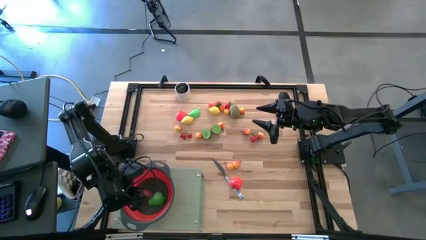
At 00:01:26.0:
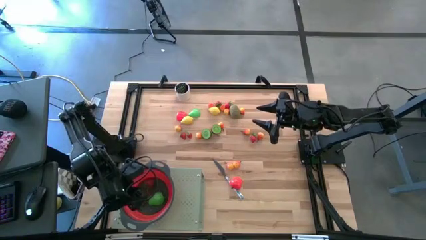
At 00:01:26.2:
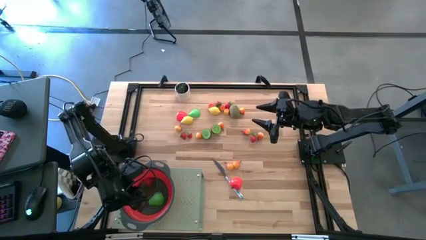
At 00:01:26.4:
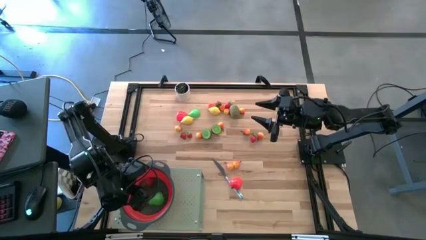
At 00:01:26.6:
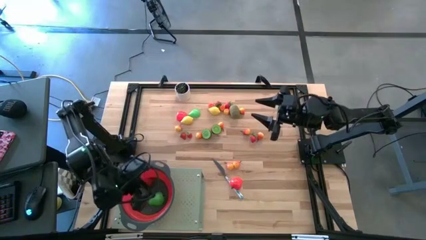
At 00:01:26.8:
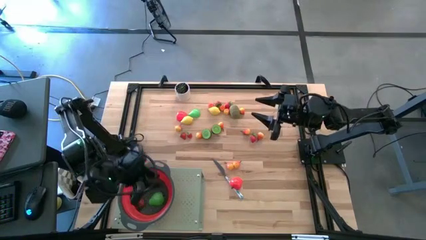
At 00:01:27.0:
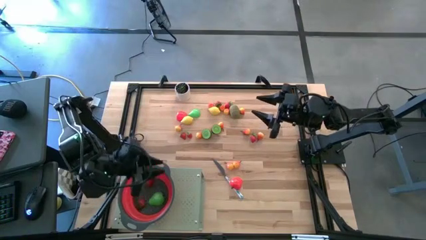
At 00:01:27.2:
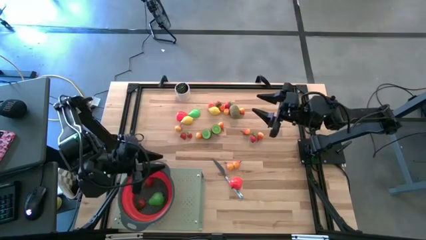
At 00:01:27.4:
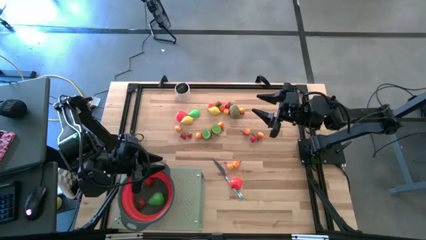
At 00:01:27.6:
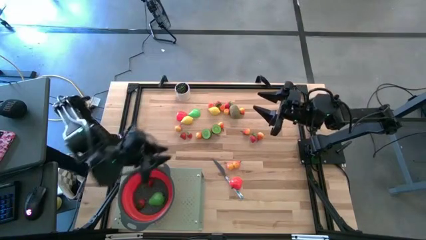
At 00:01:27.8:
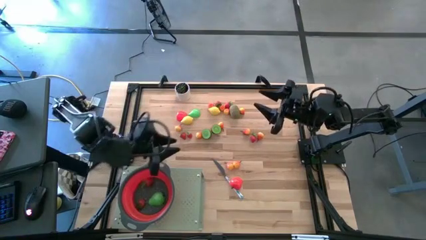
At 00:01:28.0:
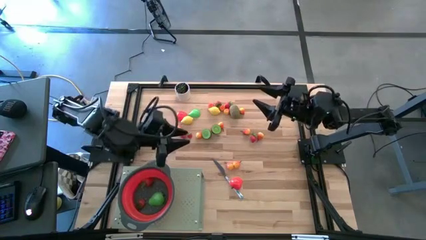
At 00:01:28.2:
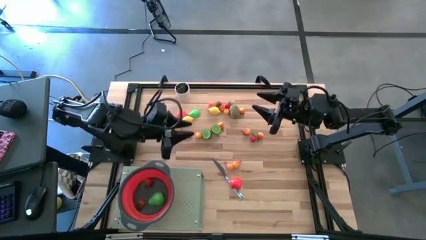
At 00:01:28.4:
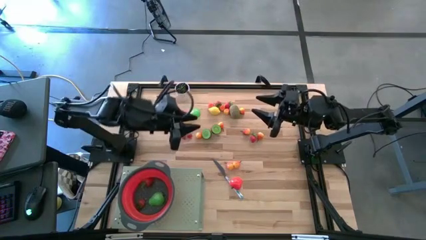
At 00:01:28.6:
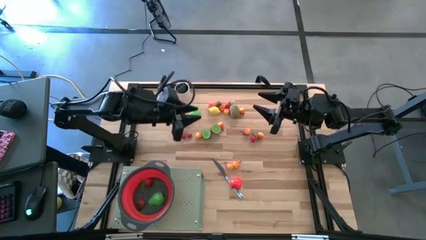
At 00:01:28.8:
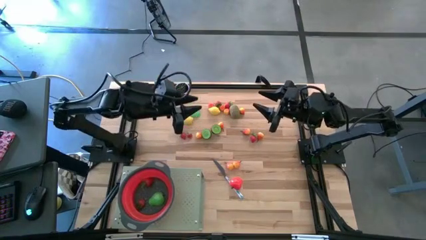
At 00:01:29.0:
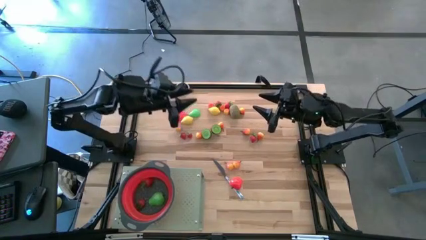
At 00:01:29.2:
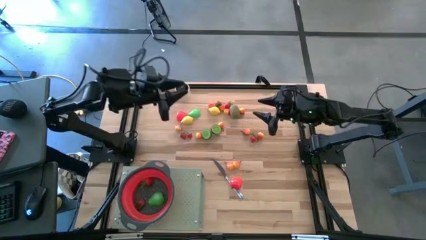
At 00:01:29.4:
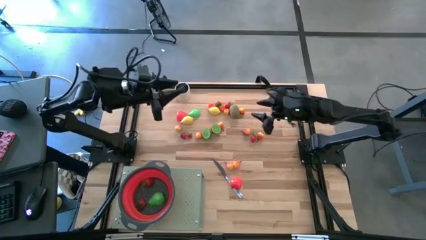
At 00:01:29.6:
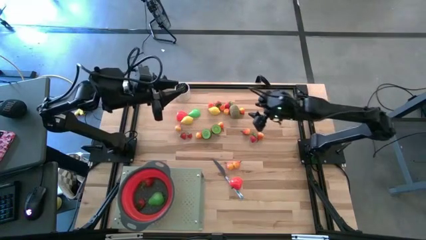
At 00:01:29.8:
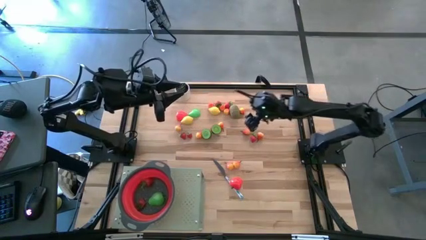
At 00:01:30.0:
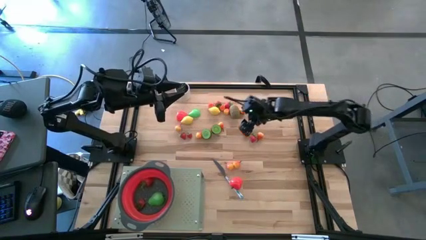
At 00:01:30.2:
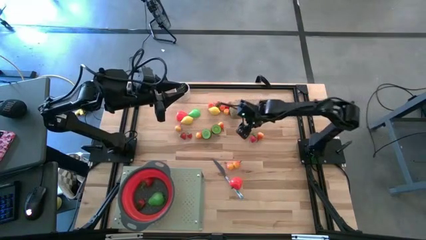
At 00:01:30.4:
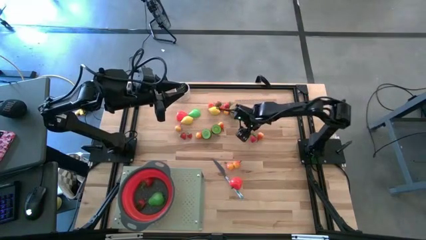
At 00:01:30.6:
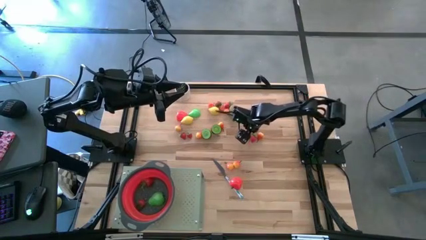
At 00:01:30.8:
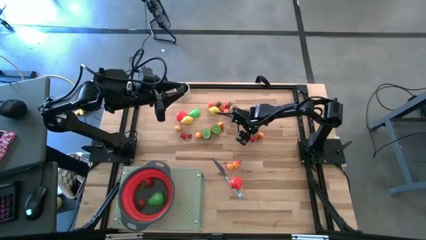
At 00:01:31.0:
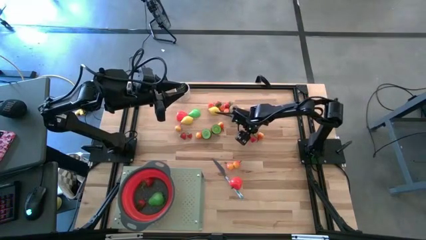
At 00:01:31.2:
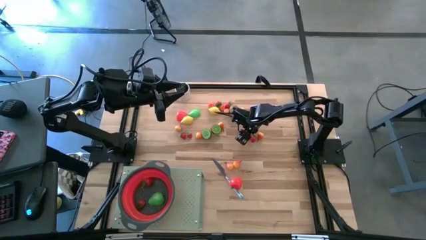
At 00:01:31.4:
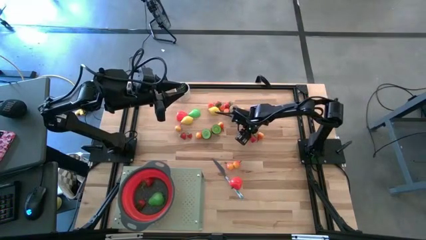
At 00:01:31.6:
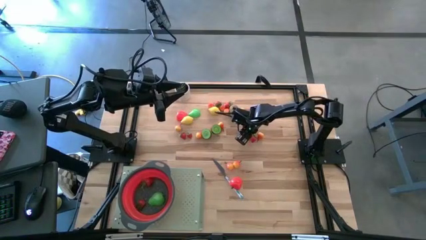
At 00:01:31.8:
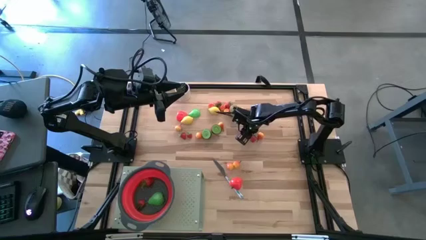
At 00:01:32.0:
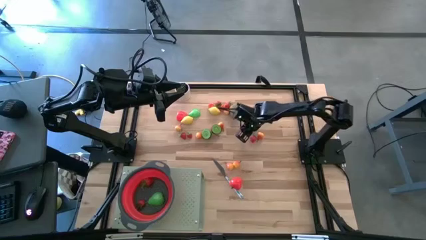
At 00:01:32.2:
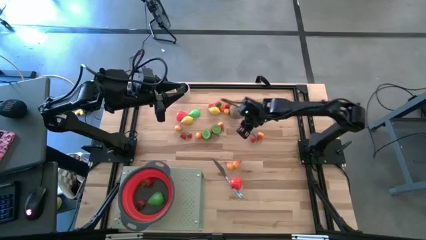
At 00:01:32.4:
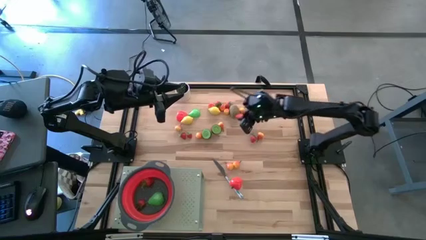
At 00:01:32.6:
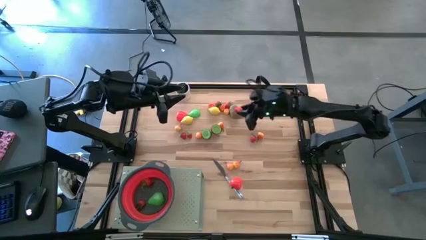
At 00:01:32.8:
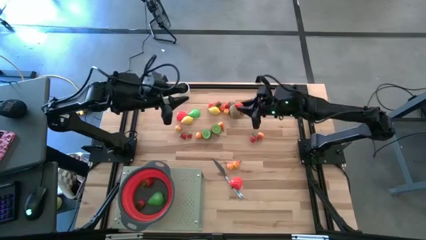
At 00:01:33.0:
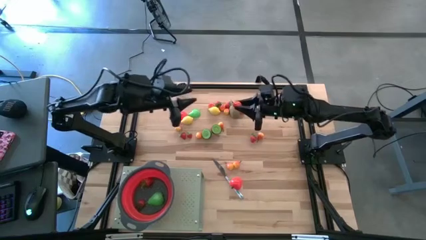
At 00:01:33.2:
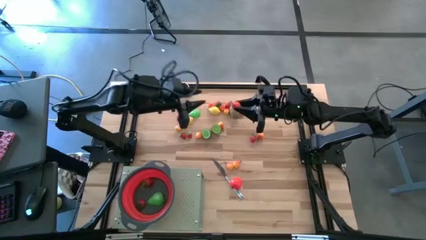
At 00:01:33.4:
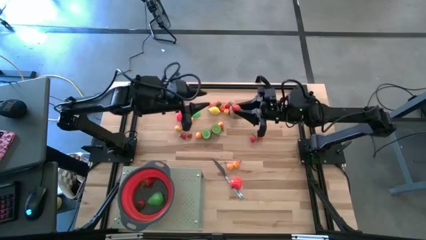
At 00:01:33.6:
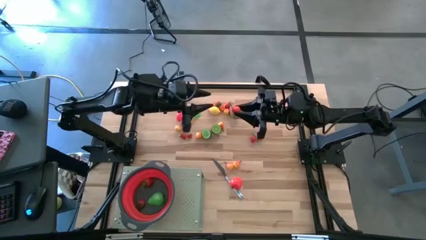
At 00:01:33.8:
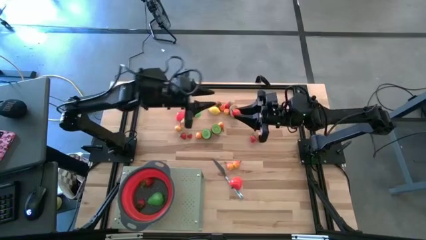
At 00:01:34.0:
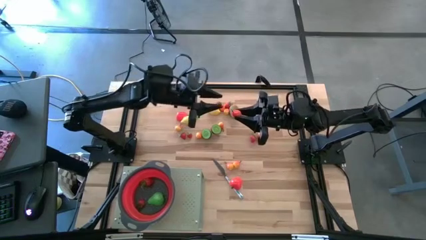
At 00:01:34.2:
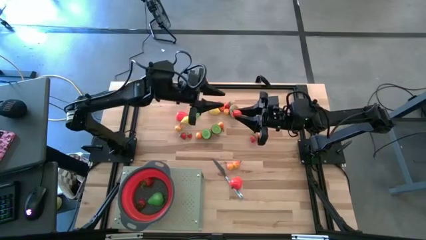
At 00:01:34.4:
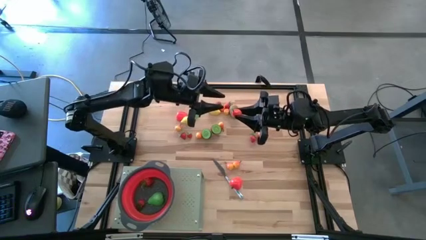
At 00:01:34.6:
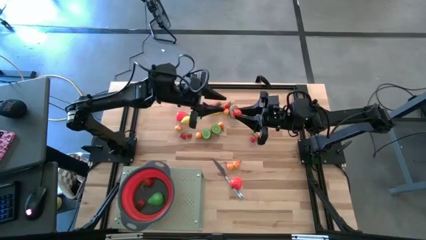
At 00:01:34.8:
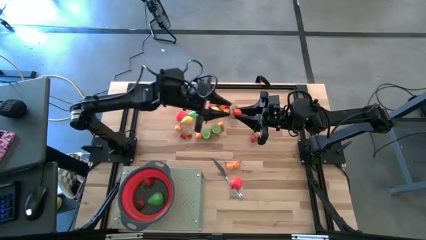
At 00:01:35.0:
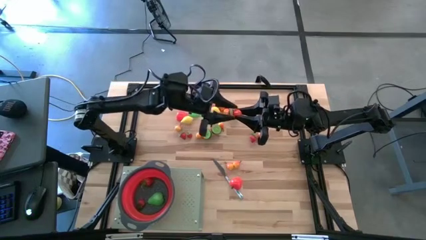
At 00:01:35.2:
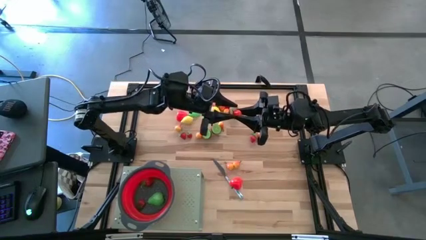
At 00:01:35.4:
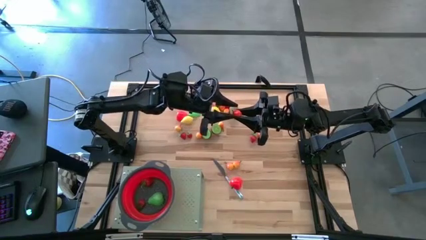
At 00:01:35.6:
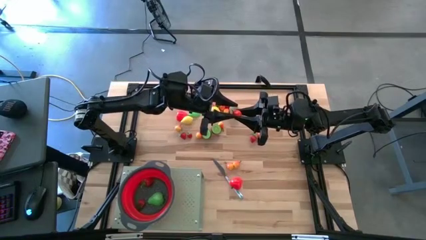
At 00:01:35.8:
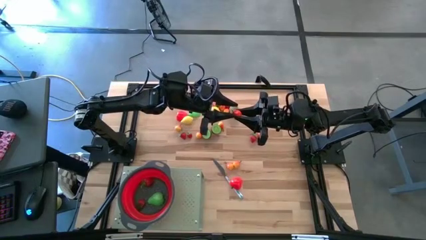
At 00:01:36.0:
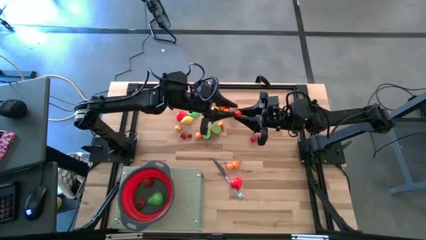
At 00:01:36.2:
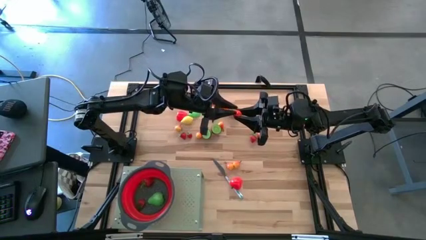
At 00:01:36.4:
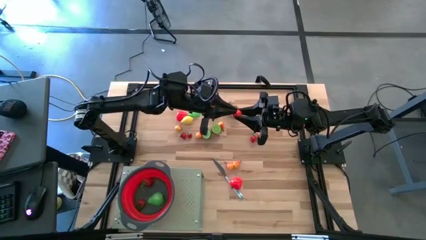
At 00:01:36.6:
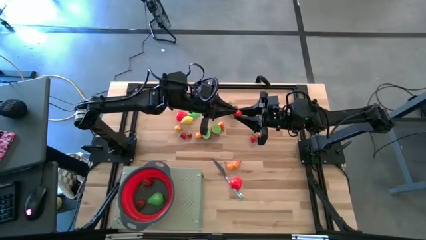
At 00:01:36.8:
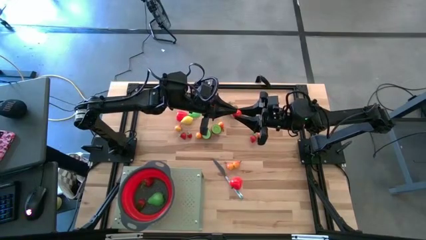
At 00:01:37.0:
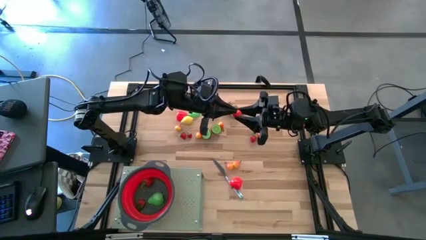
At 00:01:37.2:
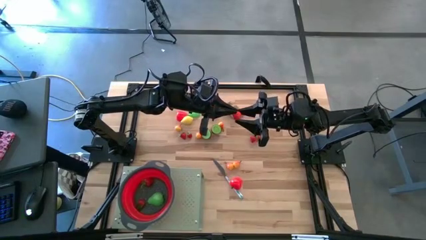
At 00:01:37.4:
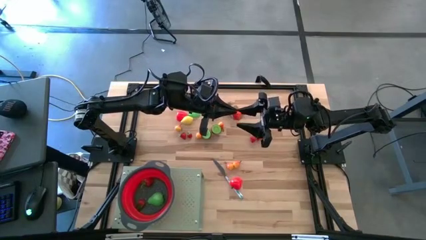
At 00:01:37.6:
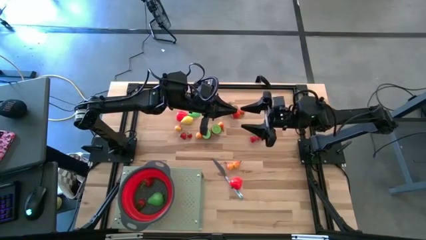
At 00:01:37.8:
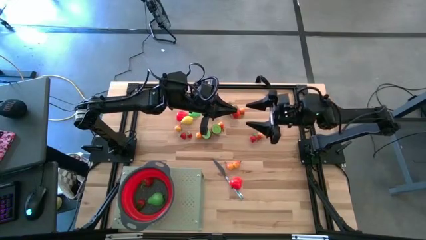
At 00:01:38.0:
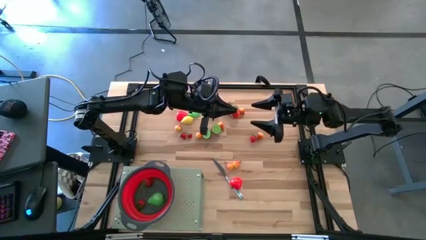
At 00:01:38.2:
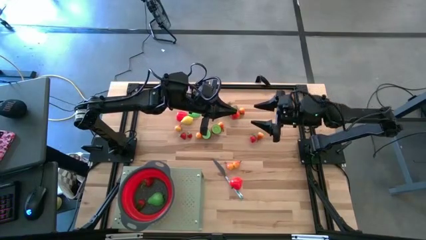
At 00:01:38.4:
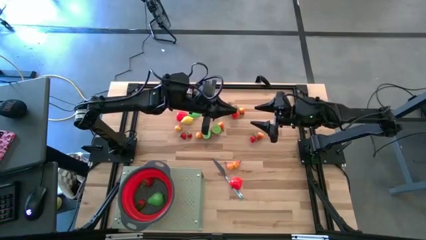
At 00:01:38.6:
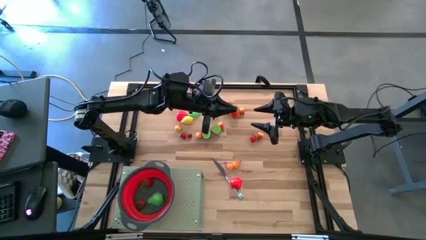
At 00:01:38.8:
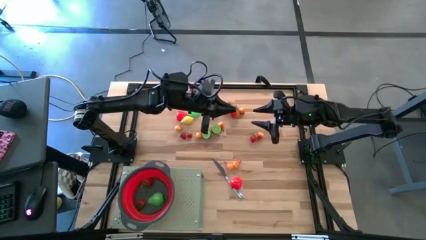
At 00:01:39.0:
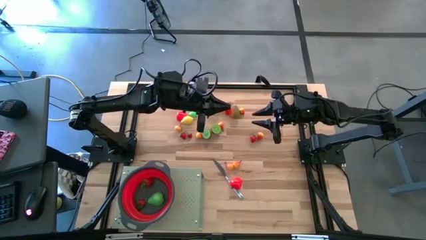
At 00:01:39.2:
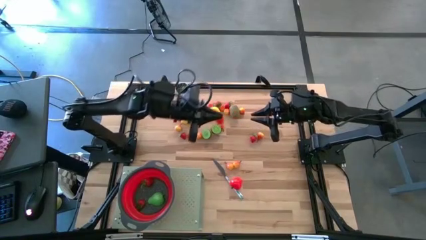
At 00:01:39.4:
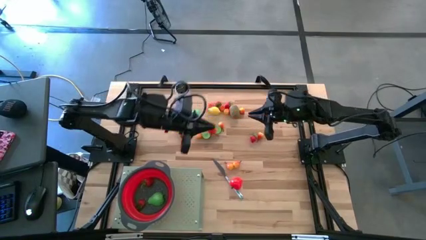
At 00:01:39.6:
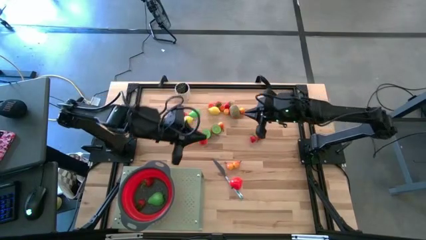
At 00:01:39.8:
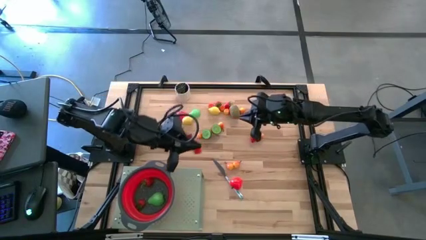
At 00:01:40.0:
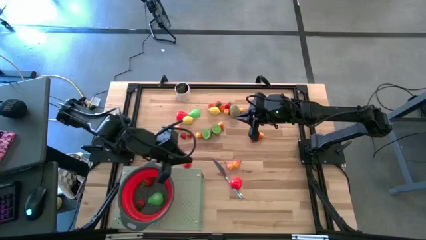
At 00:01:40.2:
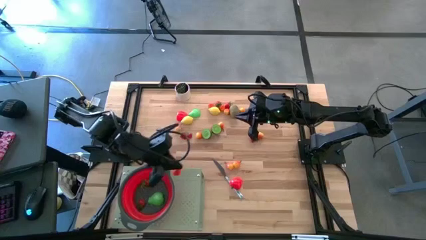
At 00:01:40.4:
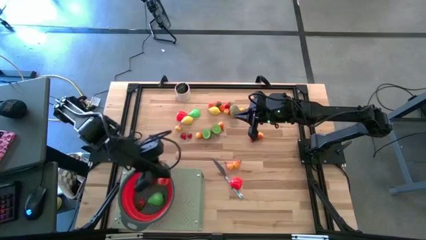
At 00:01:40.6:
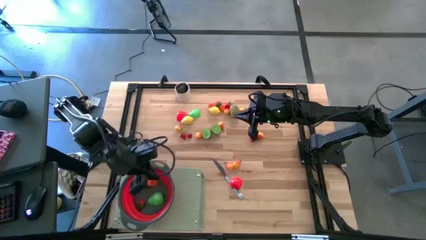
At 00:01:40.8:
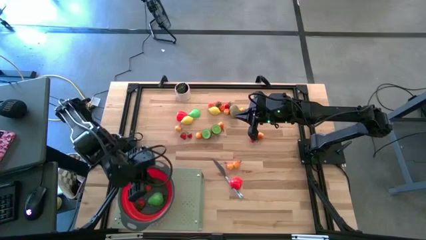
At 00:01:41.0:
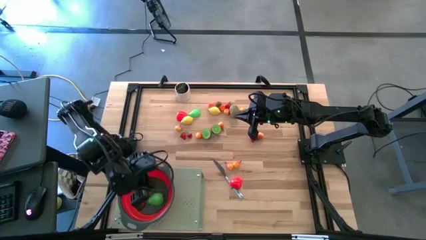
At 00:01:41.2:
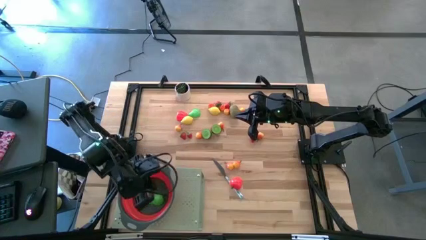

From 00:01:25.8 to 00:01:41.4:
Task: Pick & Place Fruit
Put the pear into the red strainer bowl on the shelf
